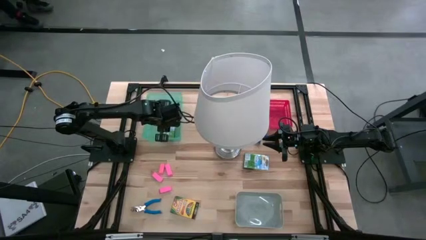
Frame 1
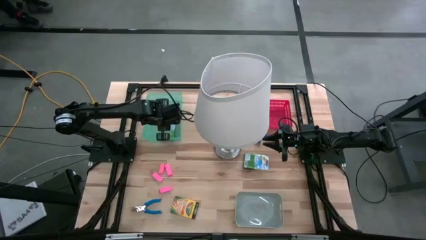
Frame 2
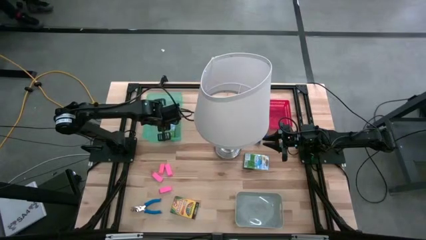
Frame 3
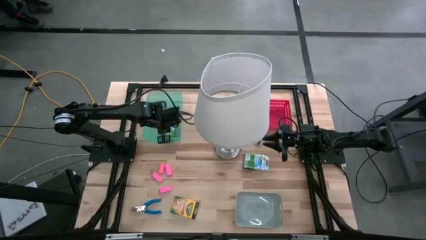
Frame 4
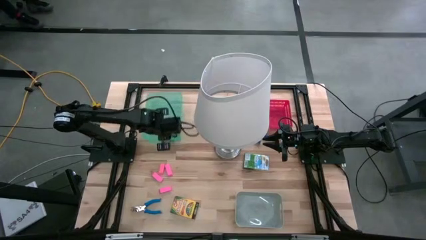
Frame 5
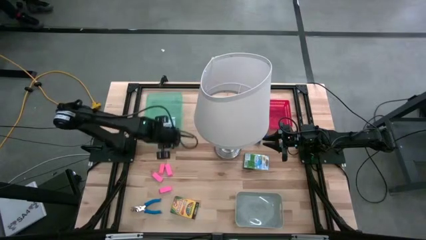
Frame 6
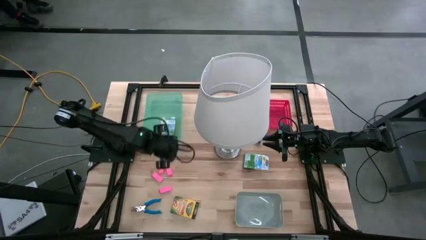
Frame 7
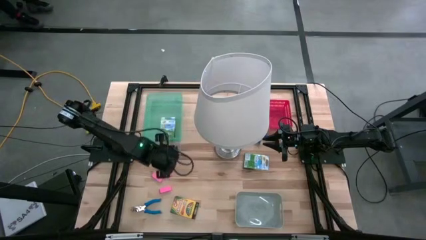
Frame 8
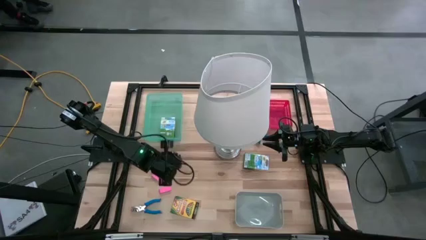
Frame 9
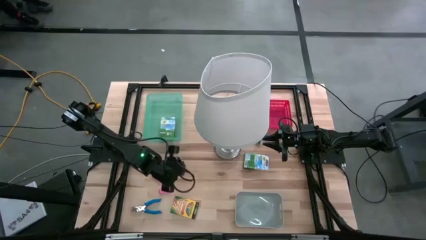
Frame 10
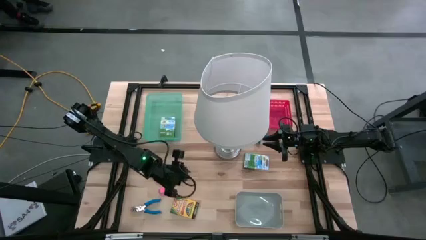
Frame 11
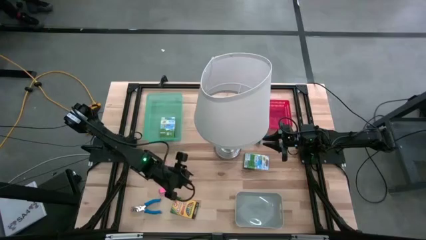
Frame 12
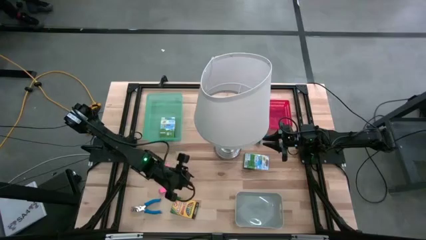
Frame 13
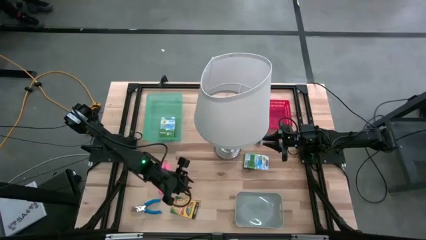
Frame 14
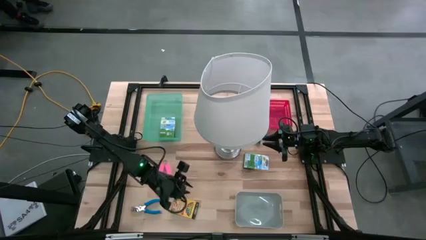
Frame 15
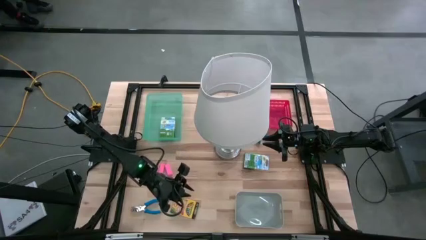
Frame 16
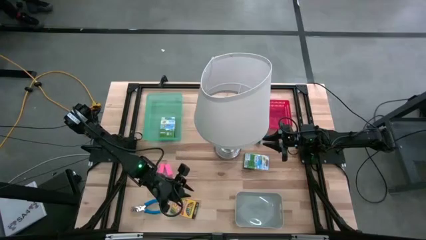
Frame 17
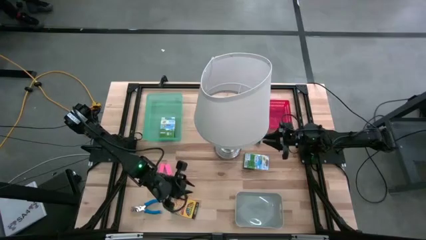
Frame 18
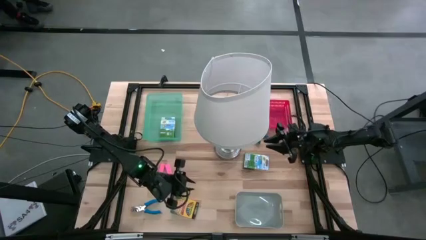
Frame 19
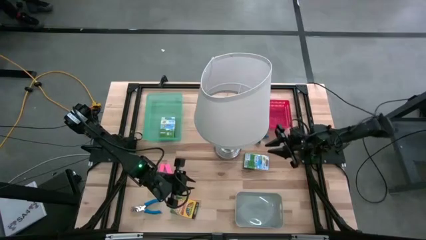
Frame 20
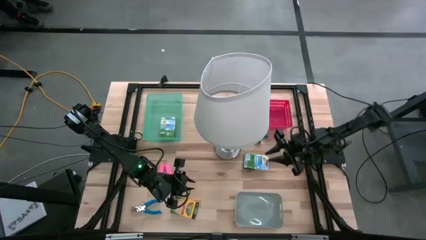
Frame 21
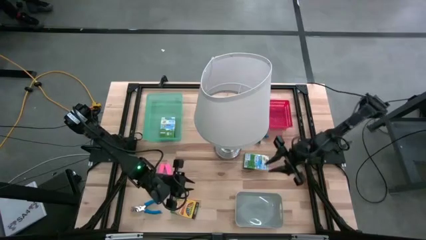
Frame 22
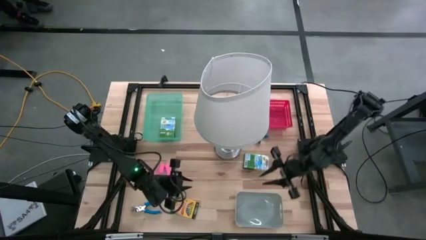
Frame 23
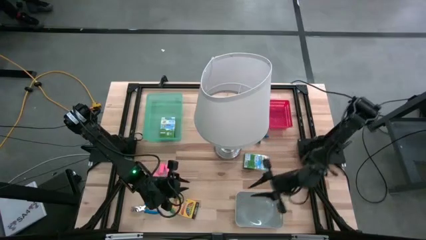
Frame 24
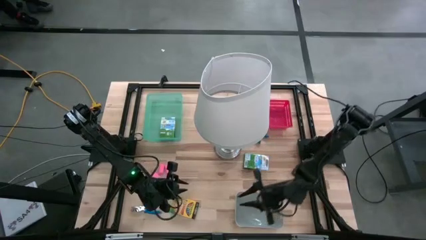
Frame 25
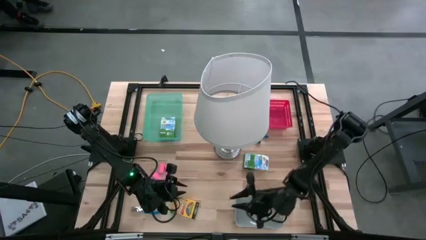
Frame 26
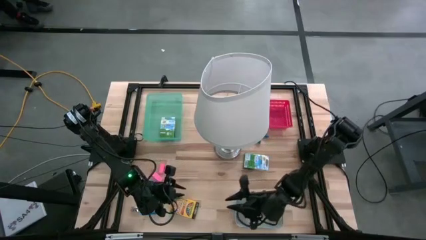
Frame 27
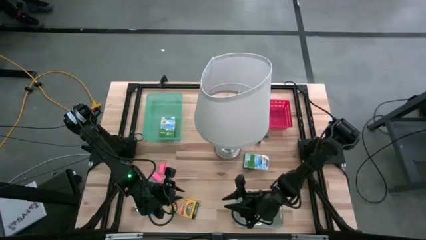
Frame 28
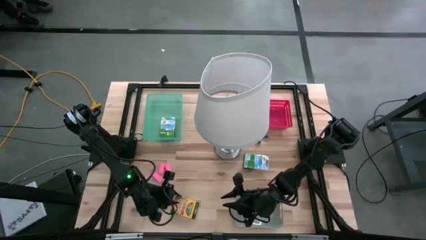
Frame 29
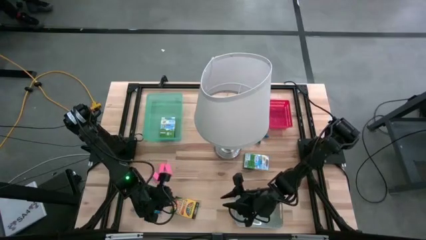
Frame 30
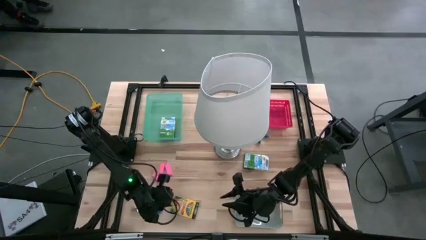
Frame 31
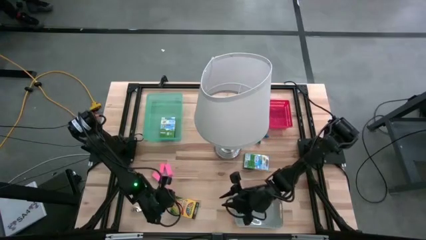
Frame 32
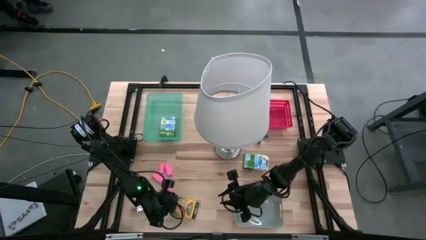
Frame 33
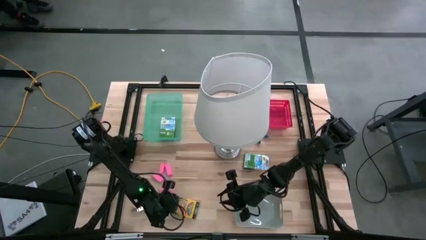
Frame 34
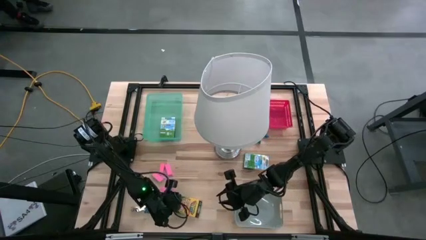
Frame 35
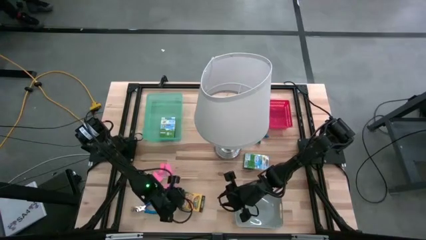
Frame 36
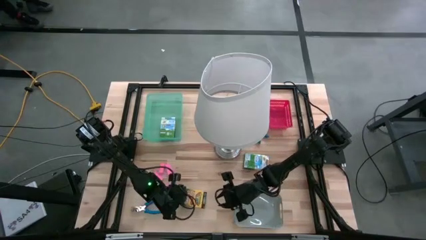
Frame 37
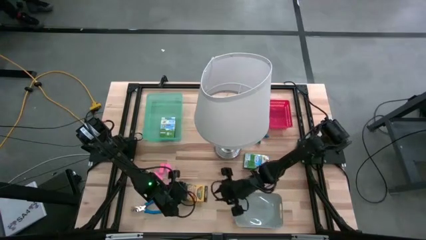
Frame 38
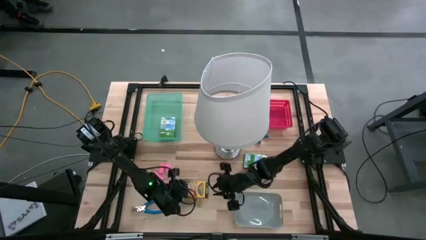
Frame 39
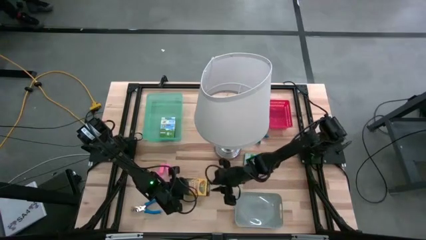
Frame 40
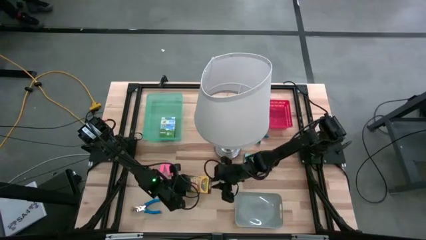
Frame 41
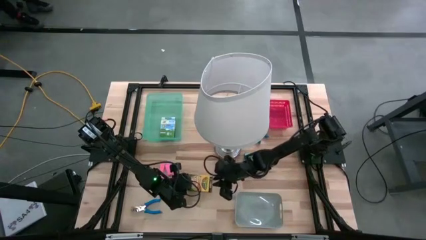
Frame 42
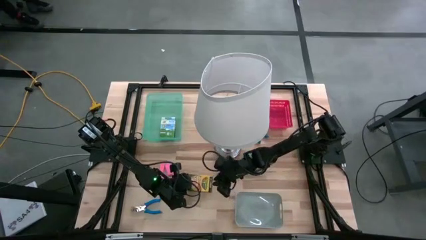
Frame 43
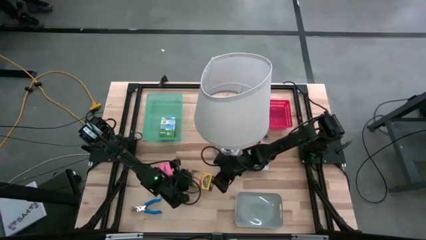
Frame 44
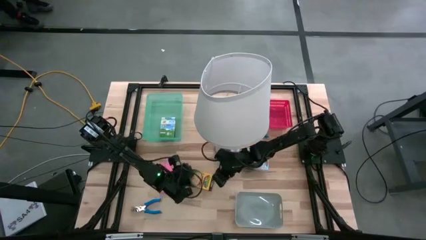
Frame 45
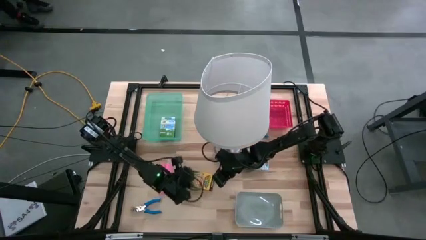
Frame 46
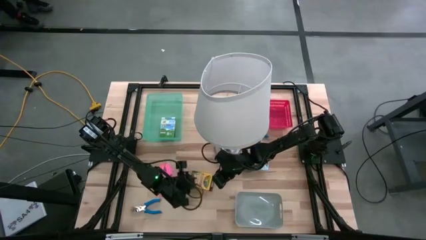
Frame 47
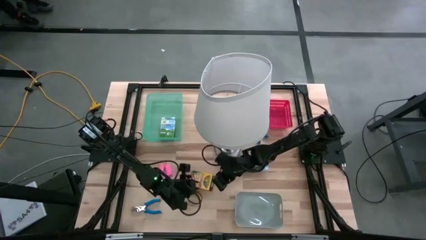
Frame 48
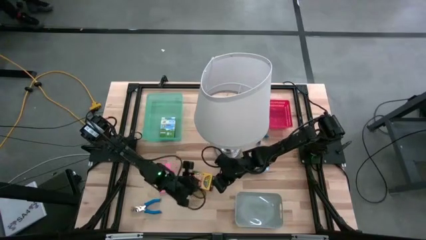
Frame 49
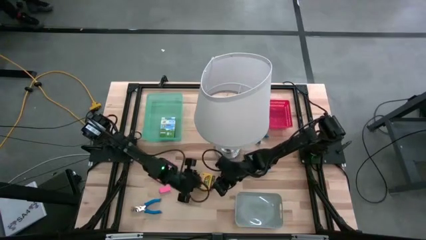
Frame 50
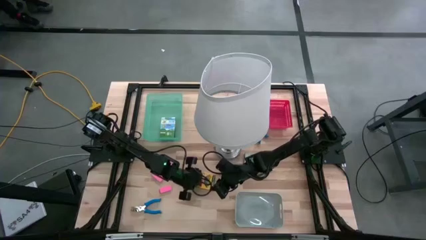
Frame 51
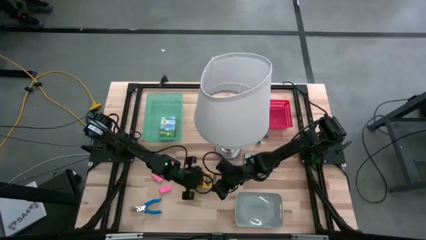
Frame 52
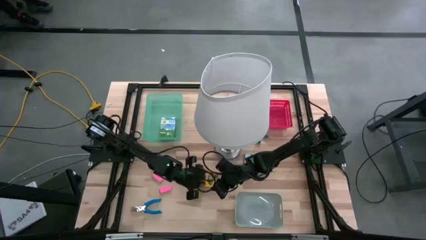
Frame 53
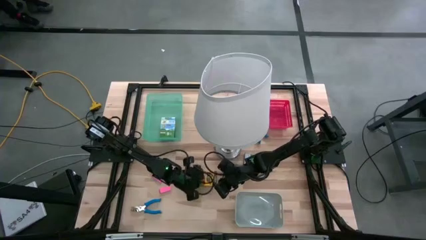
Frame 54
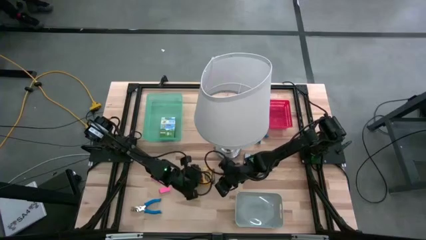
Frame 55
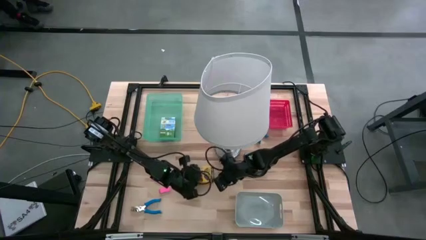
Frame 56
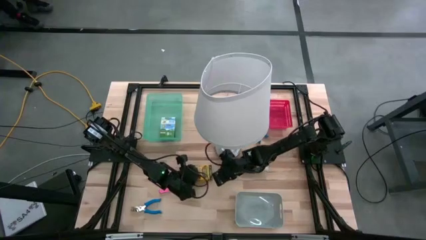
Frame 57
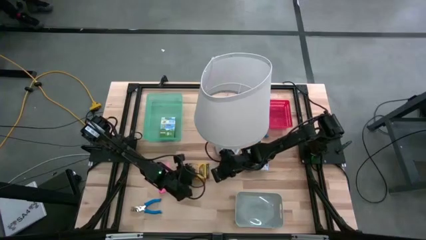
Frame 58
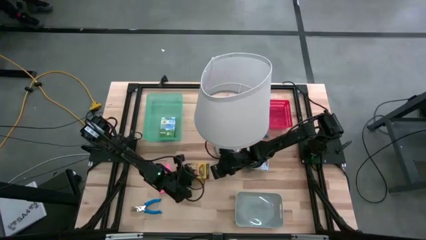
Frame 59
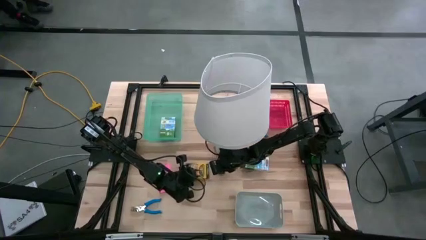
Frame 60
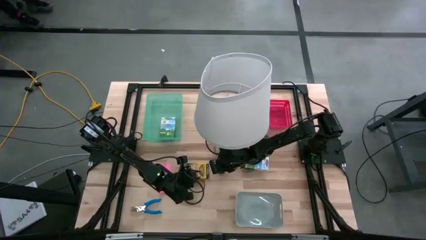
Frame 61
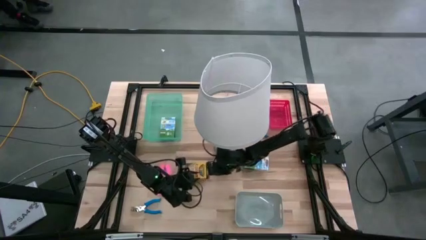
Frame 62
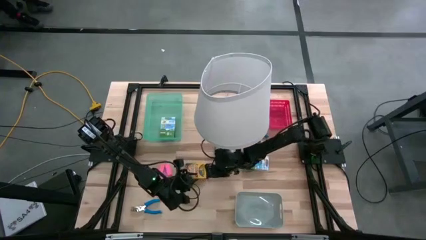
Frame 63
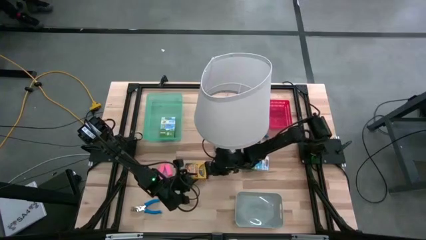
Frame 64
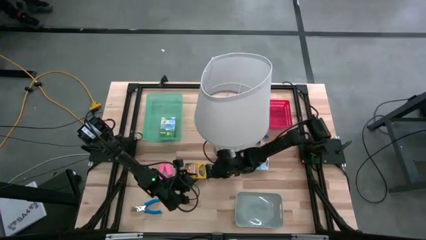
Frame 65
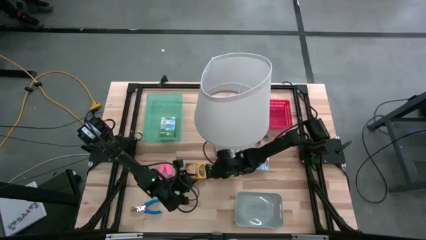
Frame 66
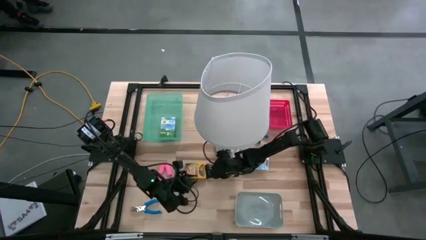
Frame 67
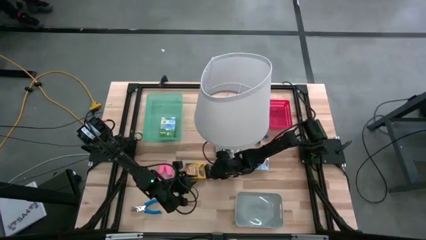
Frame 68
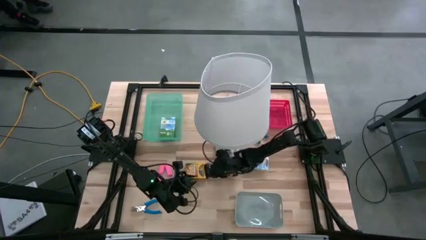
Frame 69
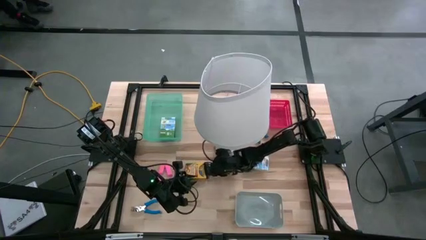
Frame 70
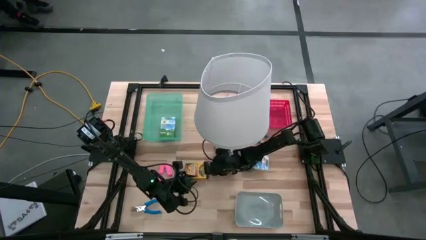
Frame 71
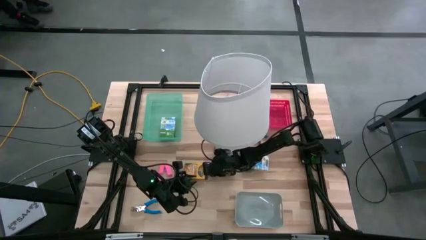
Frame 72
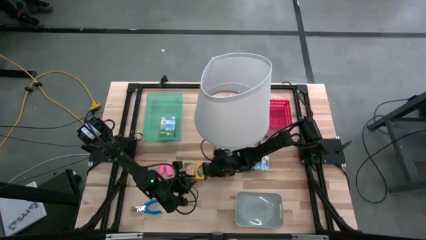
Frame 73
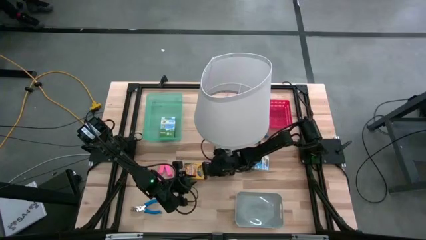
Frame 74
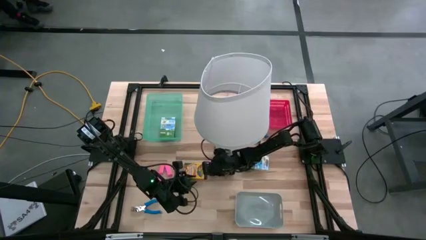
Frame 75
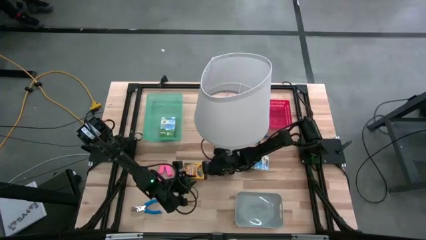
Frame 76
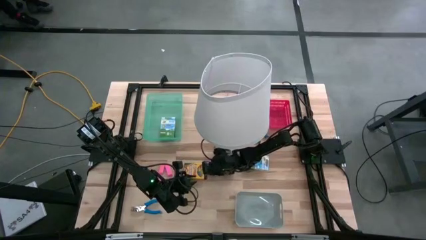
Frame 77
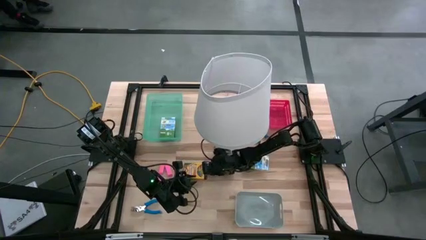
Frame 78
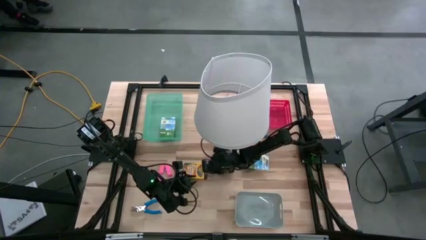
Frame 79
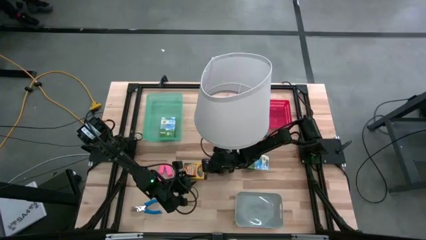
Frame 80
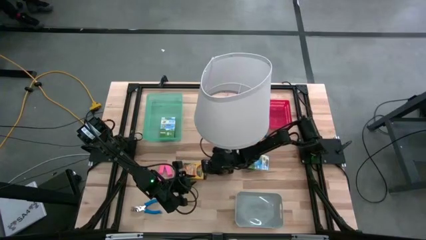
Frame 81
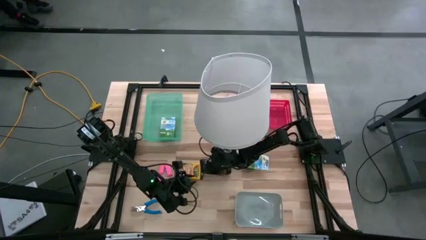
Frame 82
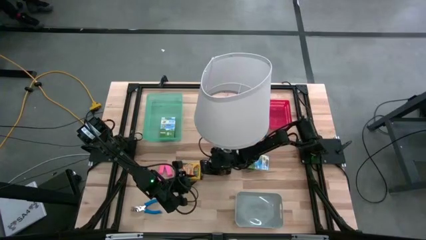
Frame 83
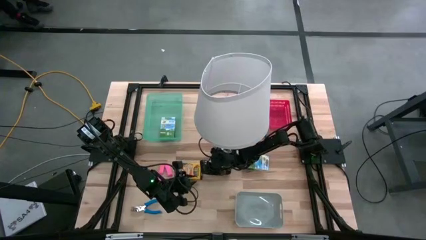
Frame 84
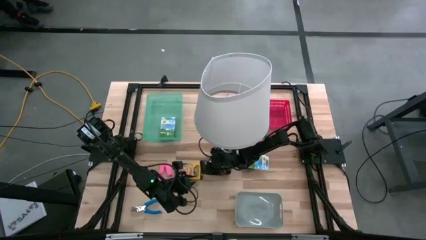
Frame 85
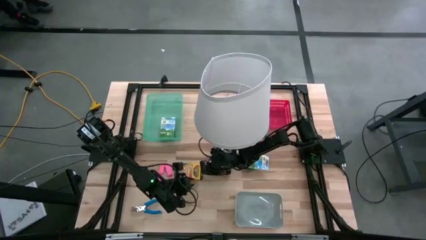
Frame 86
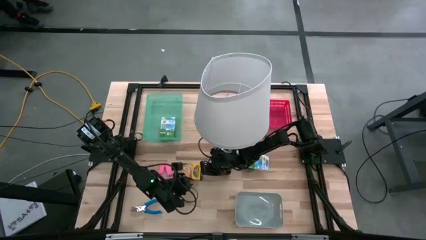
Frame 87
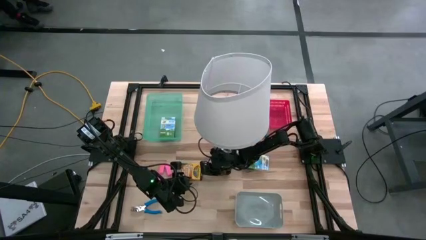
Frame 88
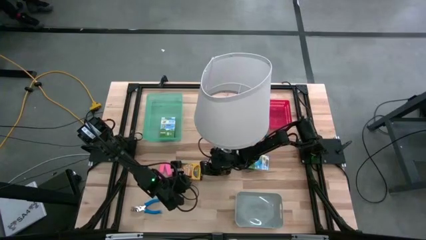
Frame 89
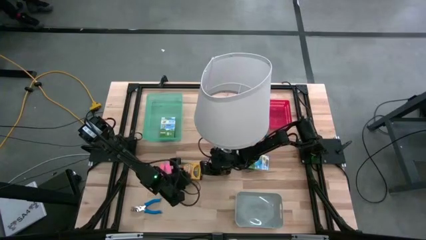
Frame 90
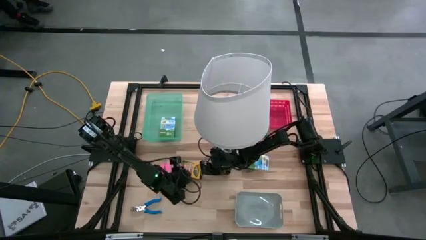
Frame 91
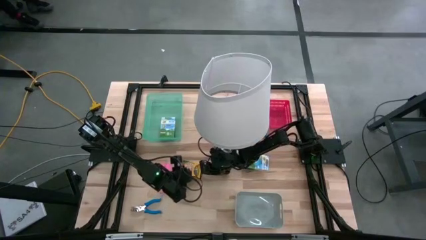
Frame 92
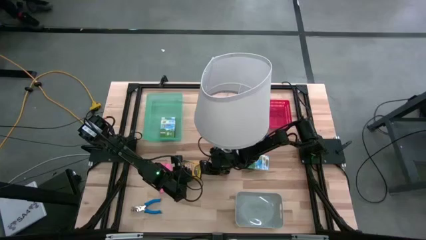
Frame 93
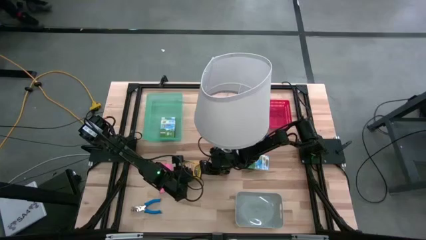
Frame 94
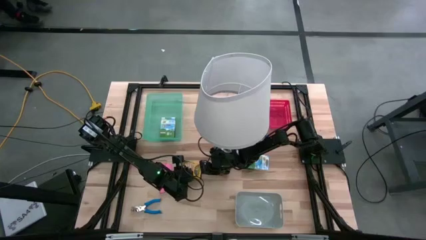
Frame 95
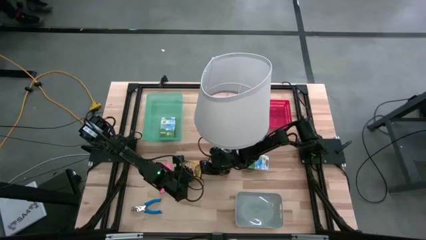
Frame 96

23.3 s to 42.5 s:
Task: Pick & Place School Supplies
Put the yellow crayon box into the green bin
